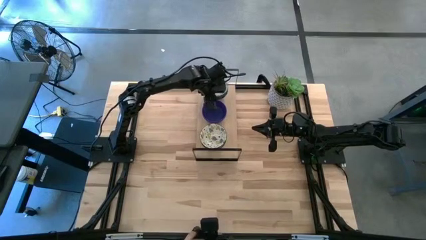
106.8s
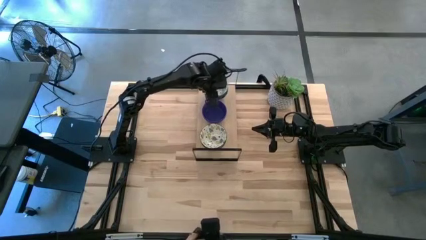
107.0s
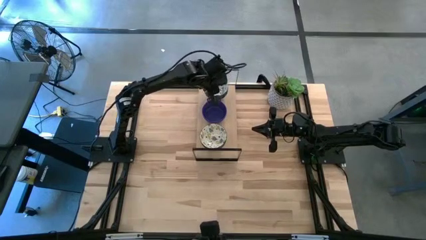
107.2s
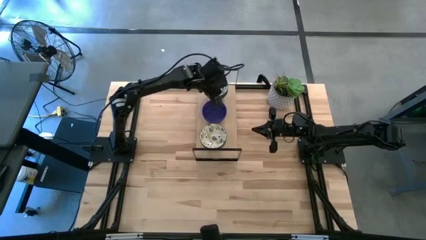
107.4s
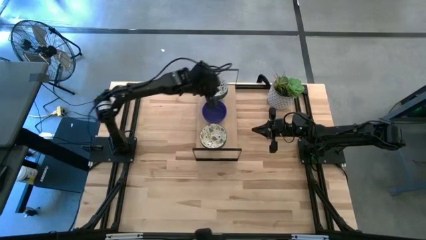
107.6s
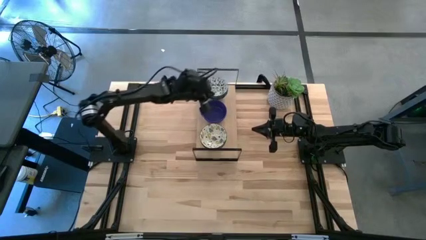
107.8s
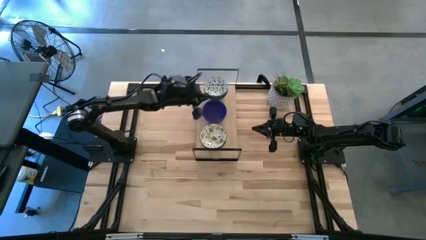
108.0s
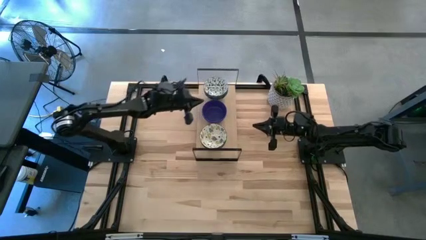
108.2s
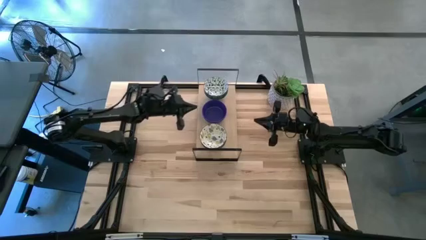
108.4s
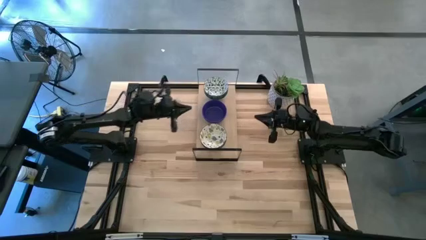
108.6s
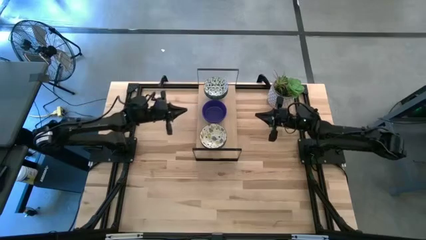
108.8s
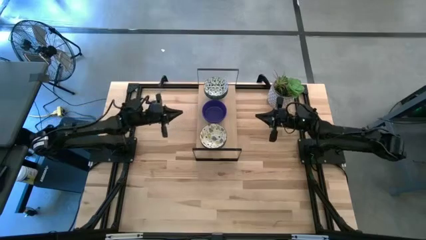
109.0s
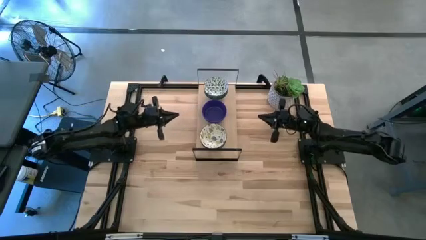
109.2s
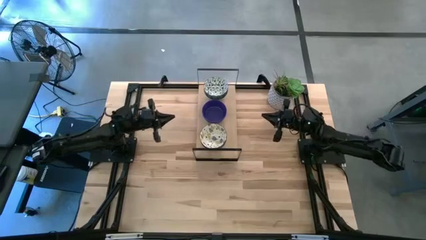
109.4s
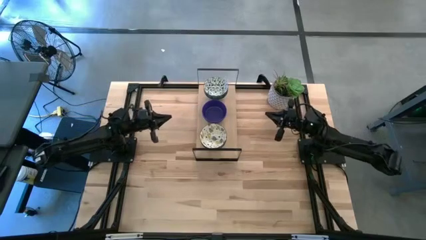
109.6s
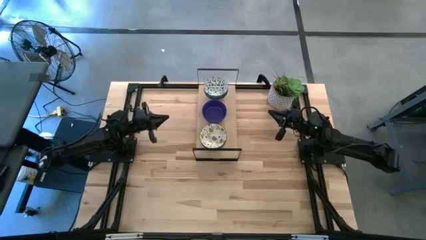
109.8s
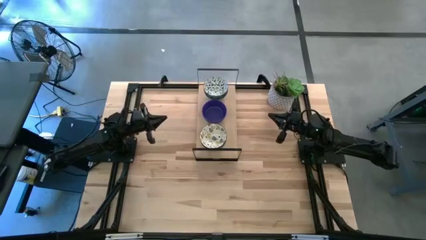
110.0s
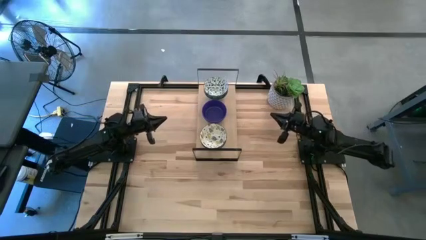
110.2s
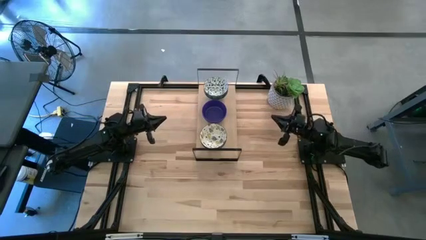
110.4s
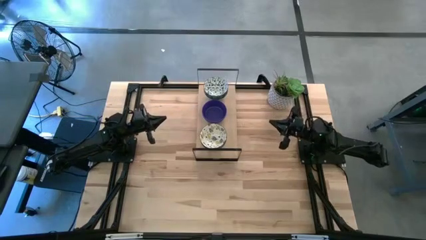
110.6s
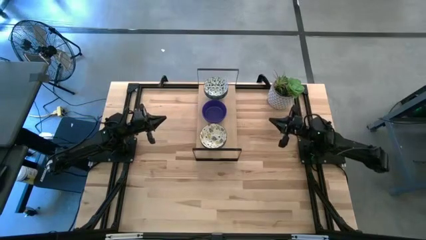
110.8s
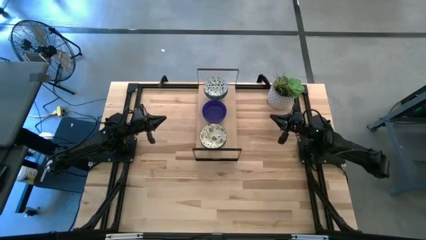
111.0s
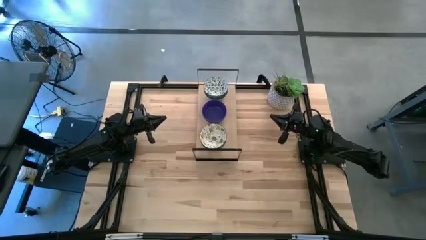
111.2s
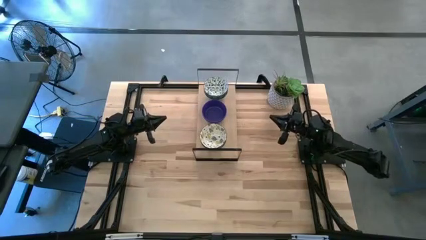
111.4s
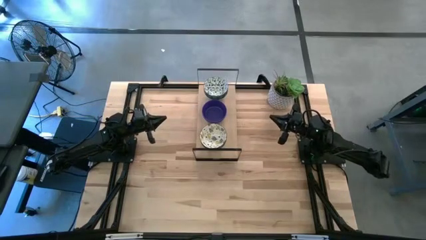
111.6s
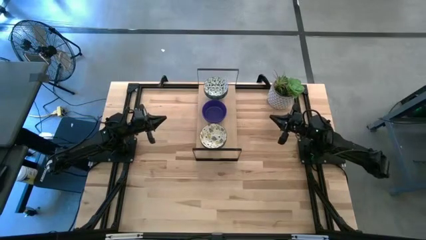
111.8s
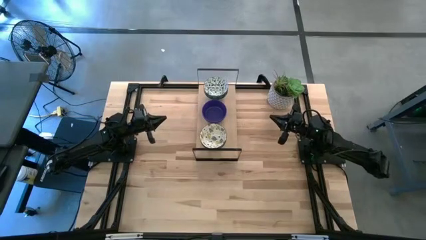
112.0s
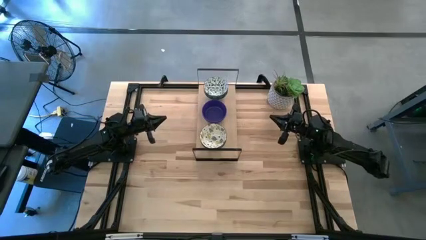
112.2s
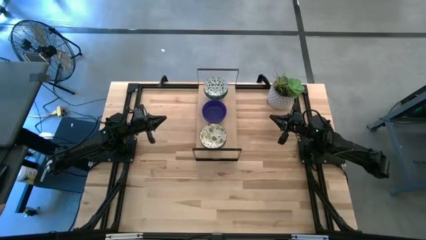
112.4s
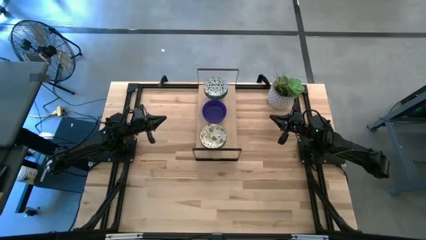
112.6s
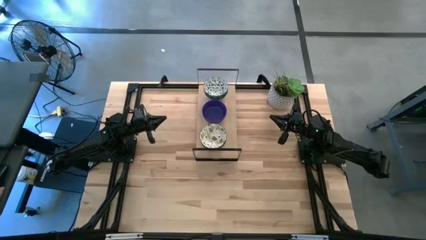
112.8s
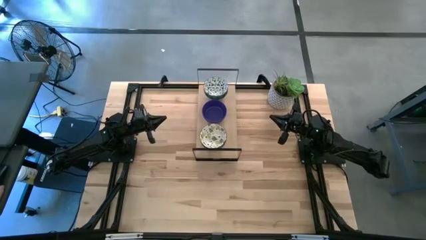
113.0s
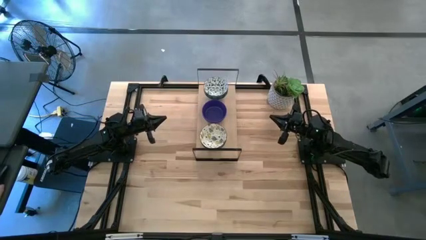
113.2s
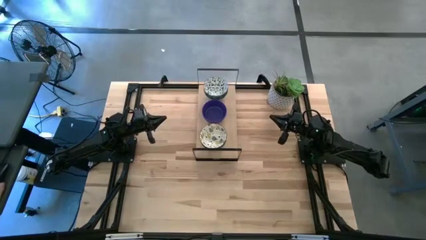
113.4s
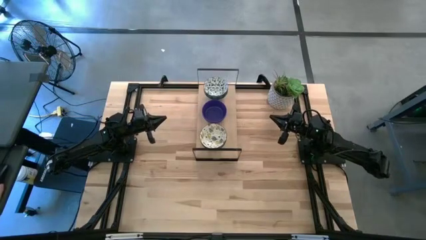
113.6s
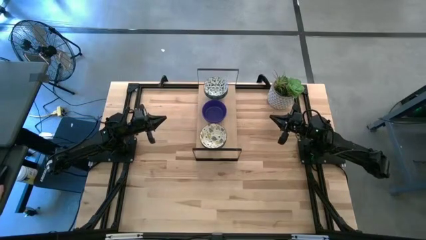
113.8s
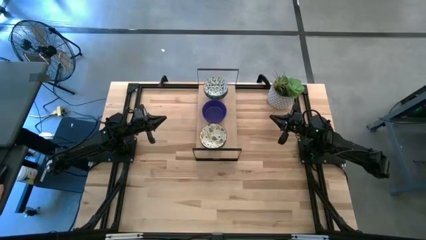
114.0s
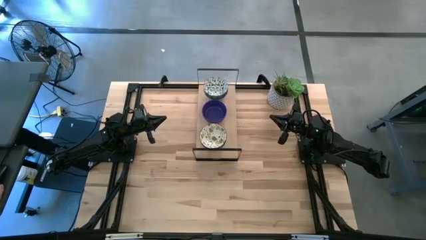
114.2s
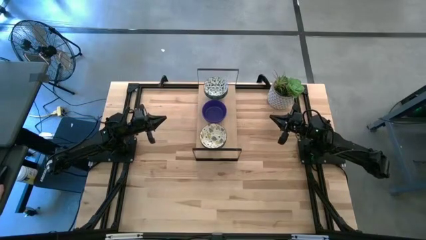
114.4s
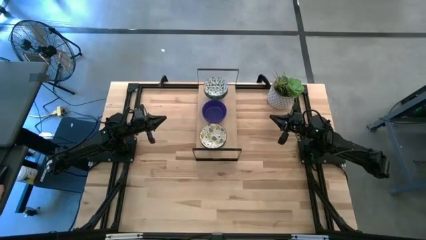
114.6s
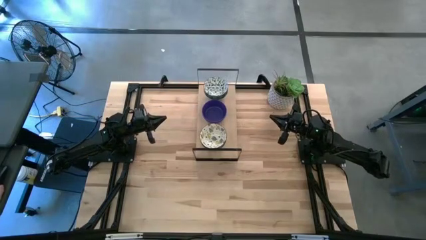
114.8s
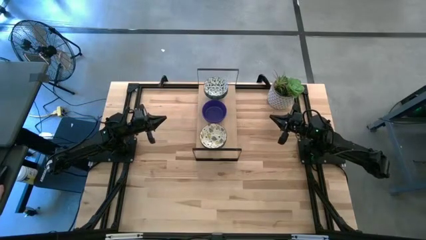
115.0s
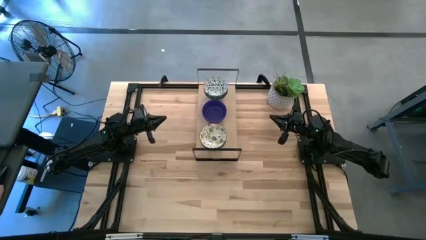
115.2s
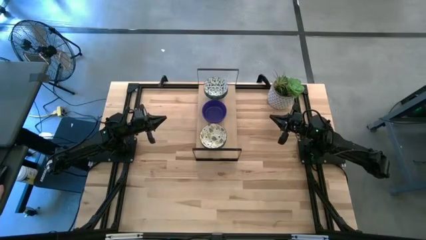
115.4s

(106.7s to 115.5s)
Task: Pick & Place Mini bowls
Return to Home Position
